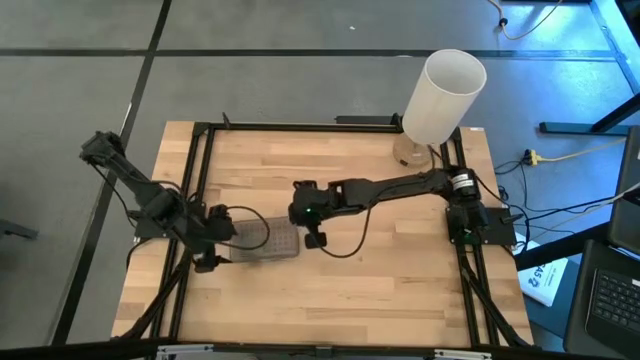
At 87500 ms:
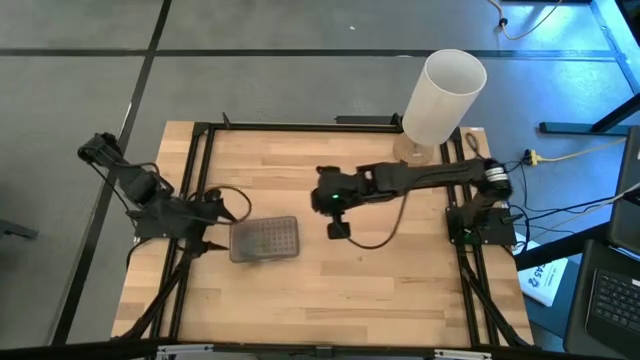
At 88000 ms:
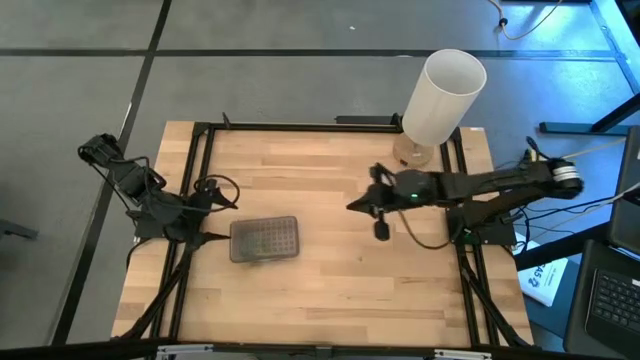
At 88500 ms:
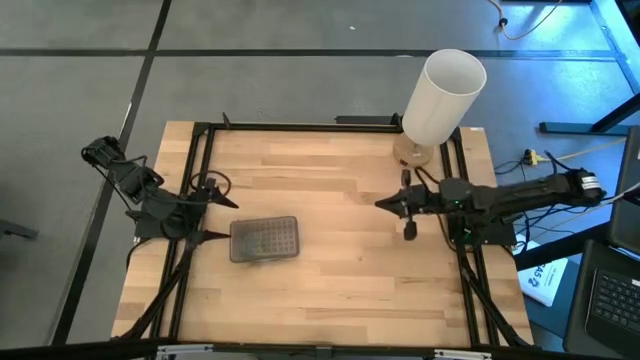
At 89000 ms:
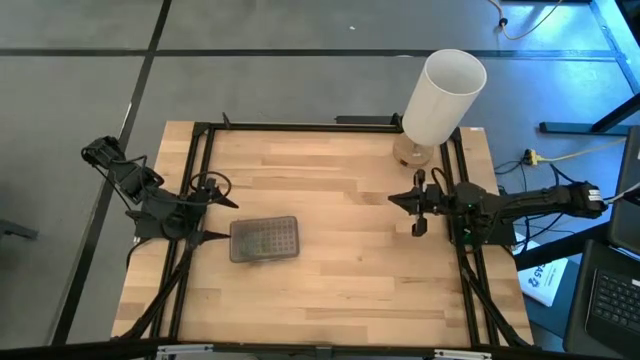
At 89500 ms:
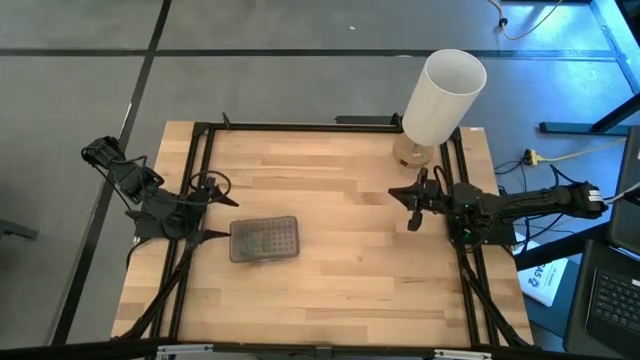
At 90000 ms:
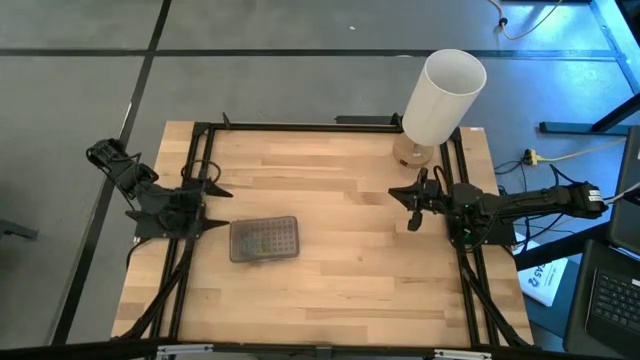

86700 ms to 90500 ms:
Task: Pack school essentials
Return to Home Position

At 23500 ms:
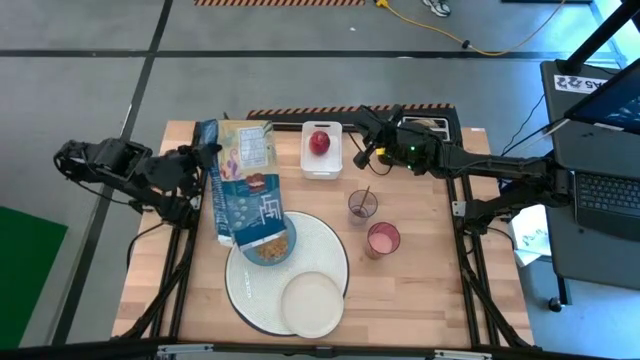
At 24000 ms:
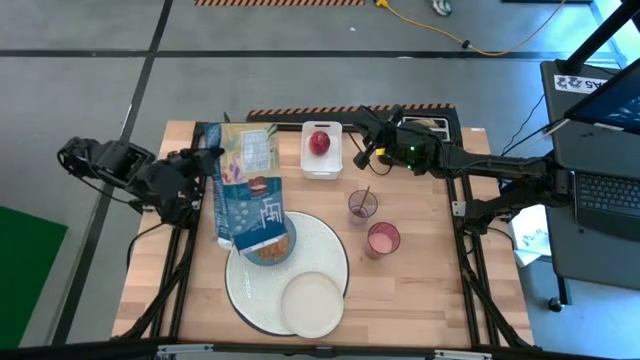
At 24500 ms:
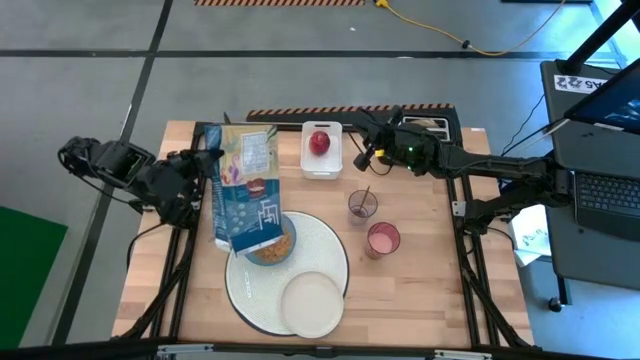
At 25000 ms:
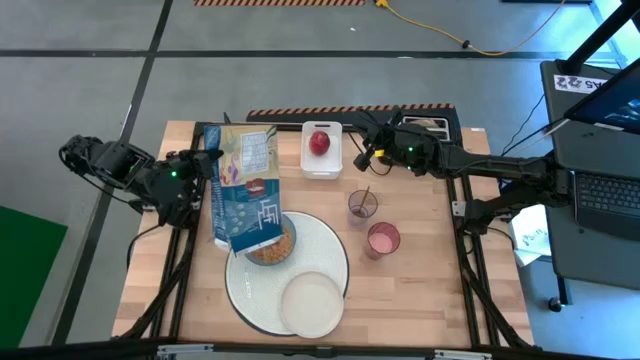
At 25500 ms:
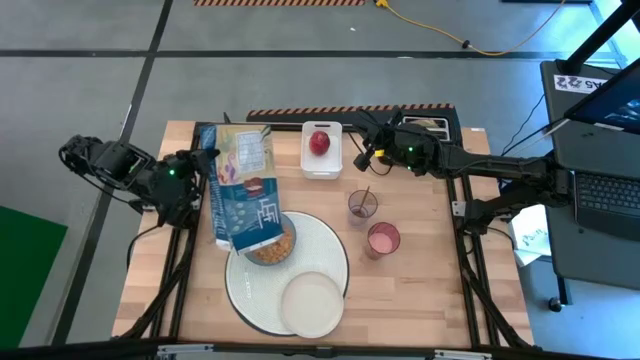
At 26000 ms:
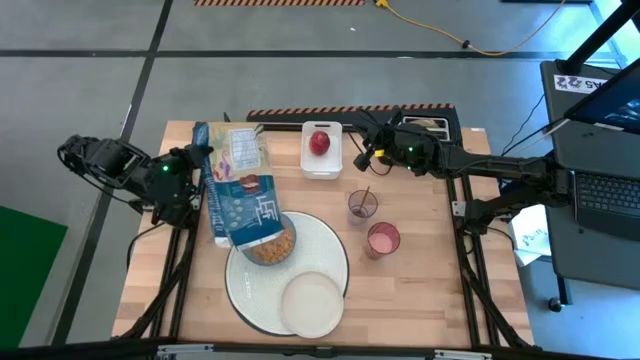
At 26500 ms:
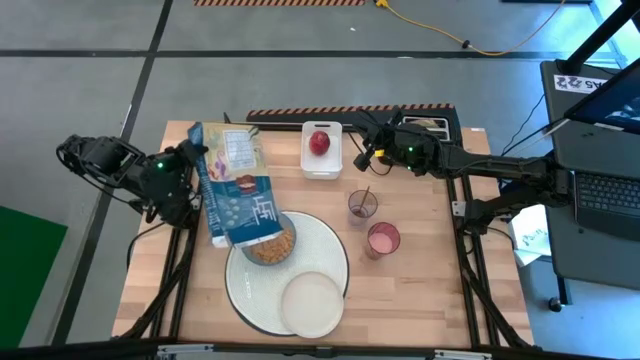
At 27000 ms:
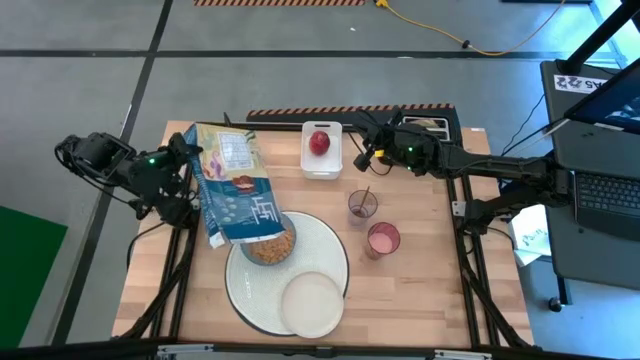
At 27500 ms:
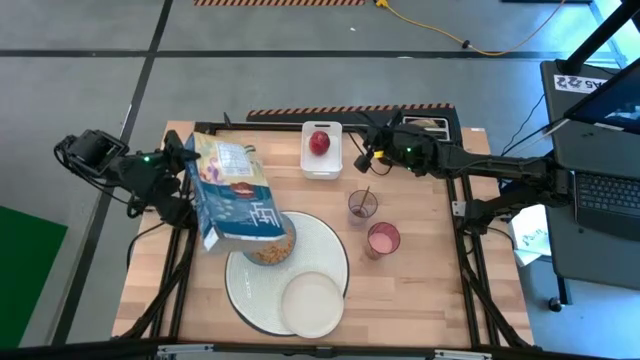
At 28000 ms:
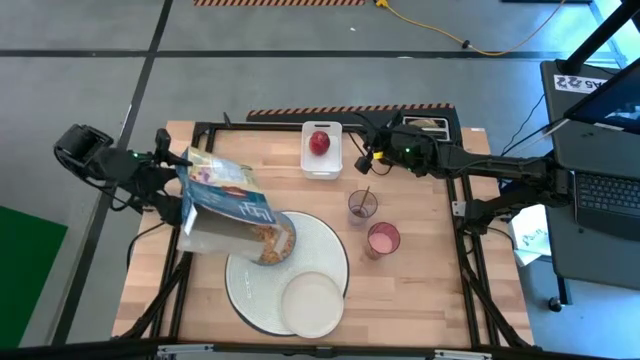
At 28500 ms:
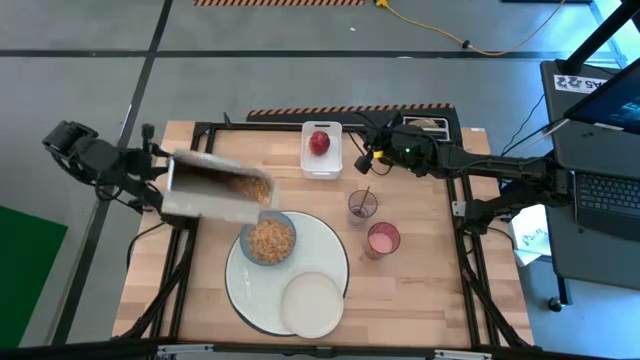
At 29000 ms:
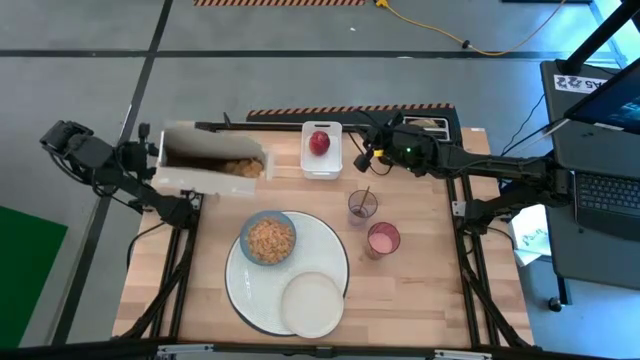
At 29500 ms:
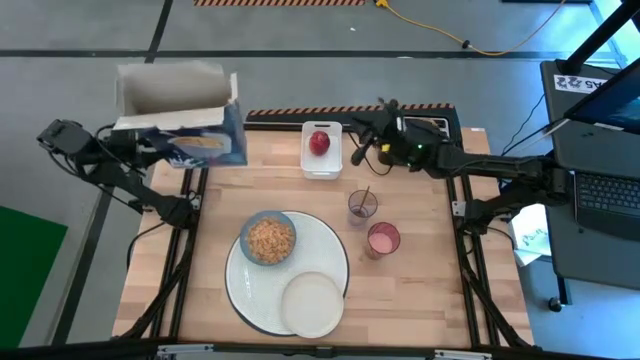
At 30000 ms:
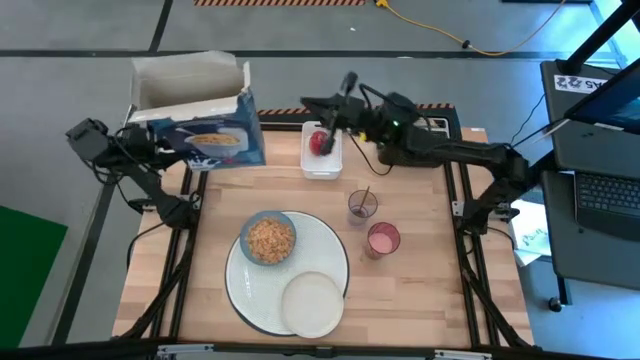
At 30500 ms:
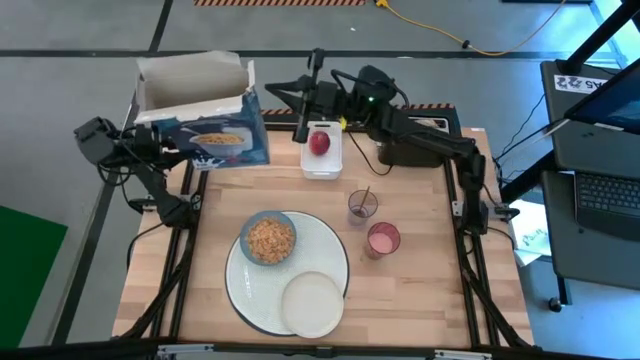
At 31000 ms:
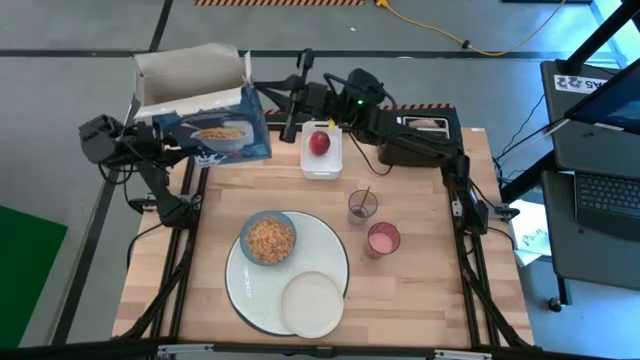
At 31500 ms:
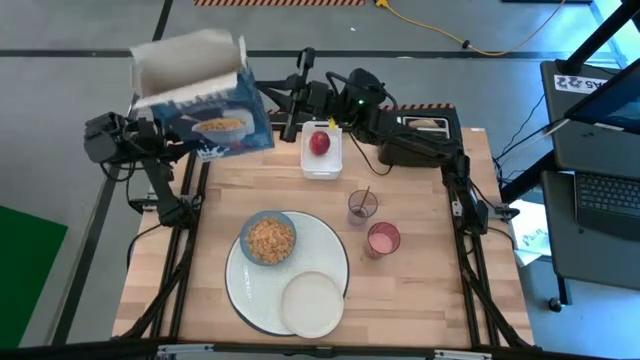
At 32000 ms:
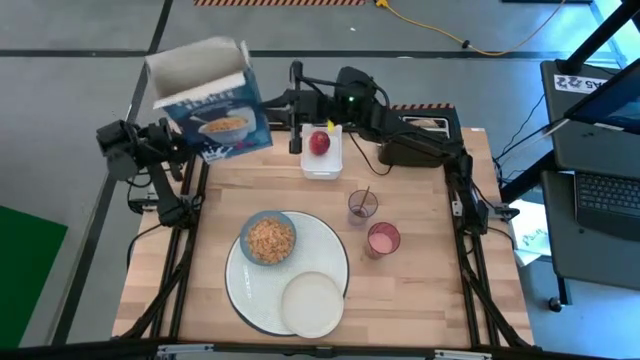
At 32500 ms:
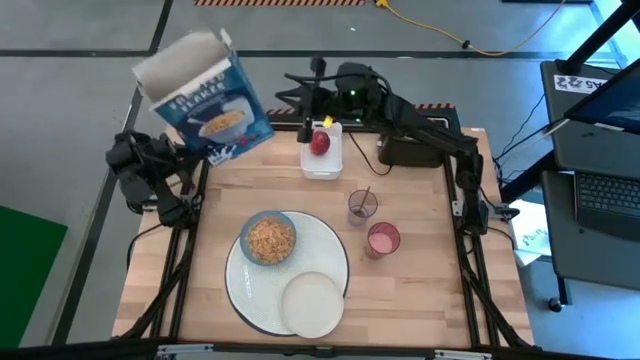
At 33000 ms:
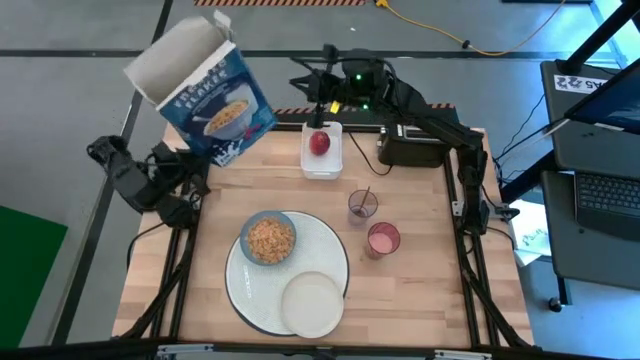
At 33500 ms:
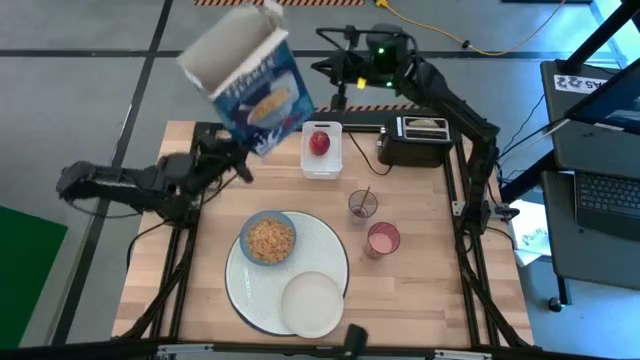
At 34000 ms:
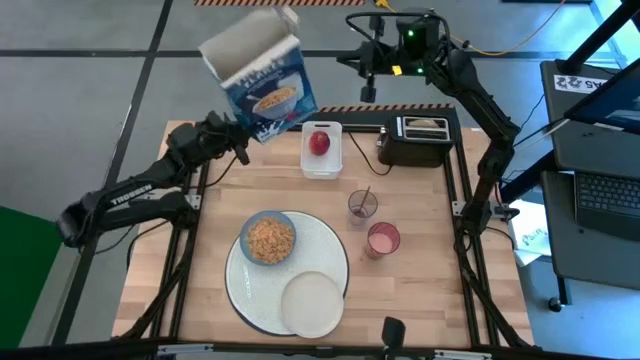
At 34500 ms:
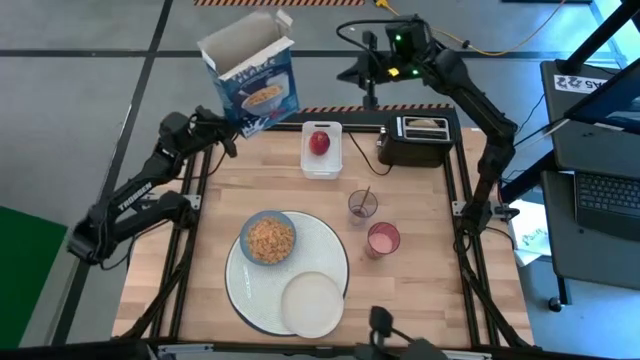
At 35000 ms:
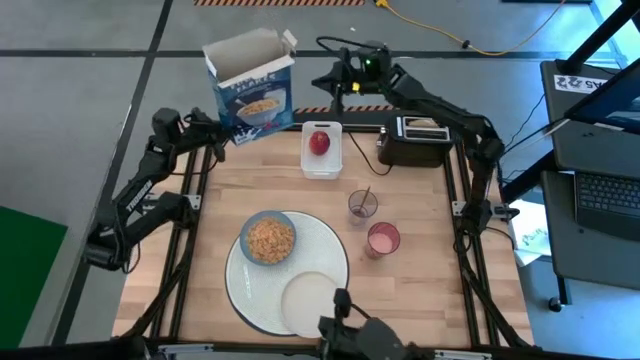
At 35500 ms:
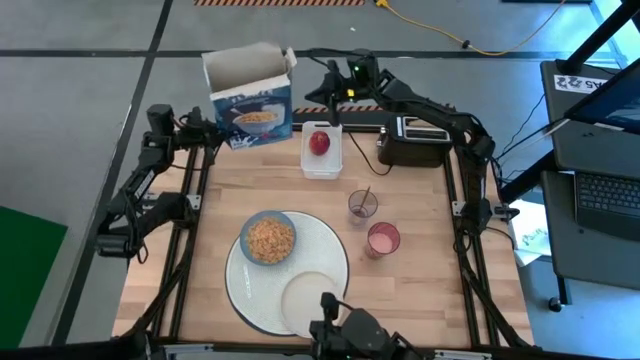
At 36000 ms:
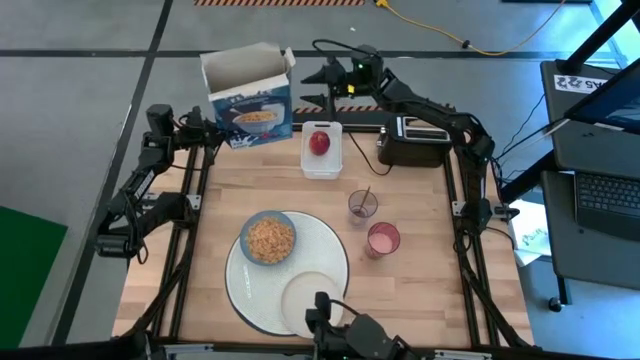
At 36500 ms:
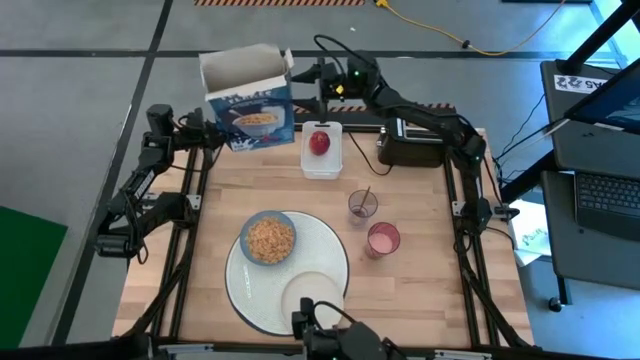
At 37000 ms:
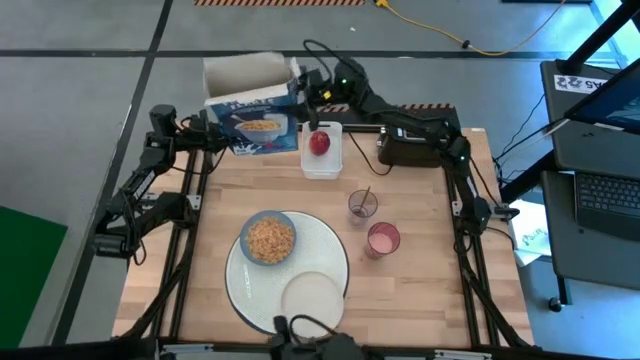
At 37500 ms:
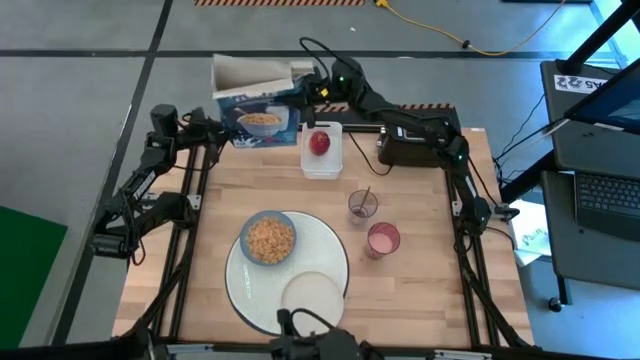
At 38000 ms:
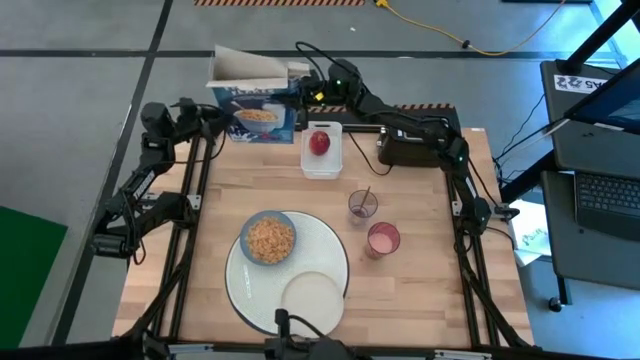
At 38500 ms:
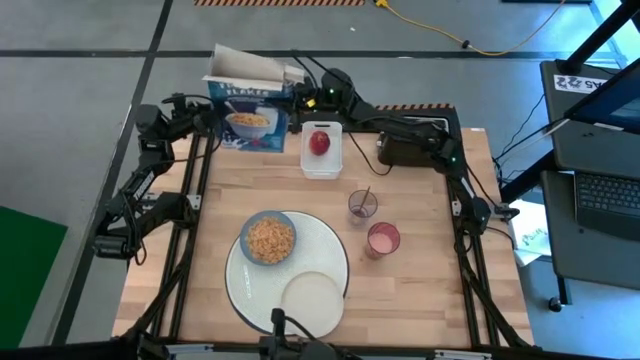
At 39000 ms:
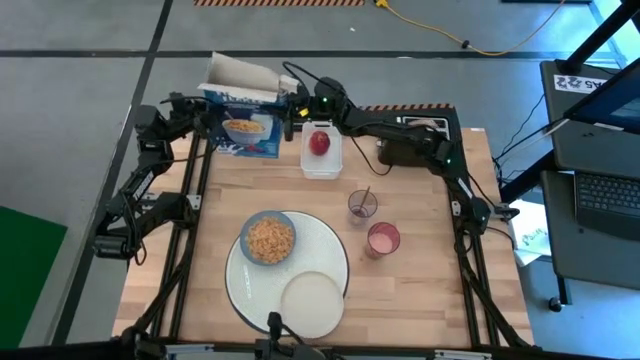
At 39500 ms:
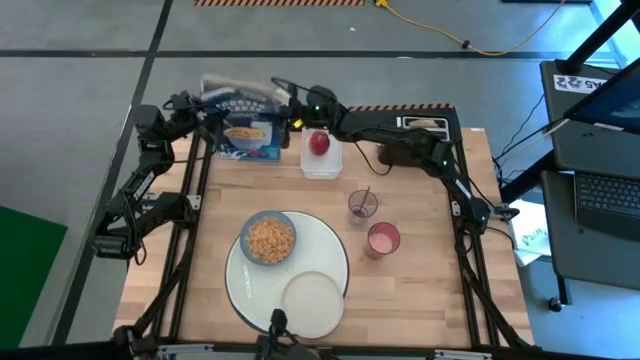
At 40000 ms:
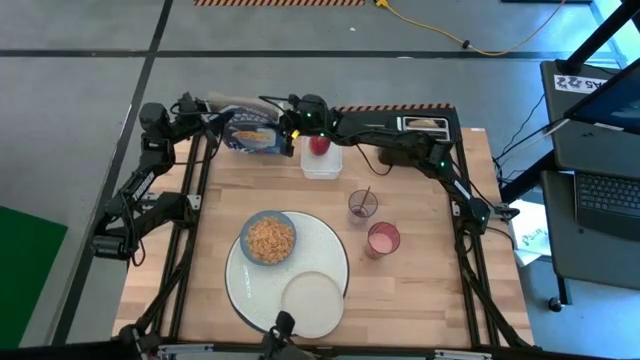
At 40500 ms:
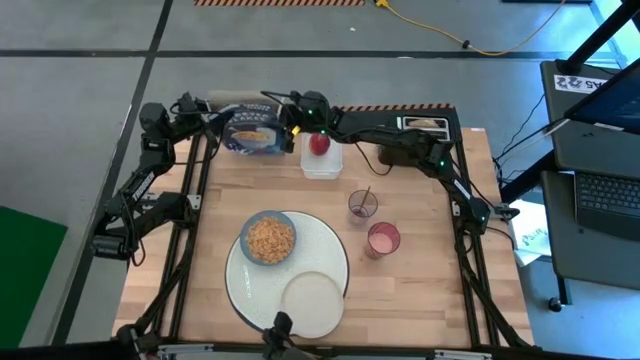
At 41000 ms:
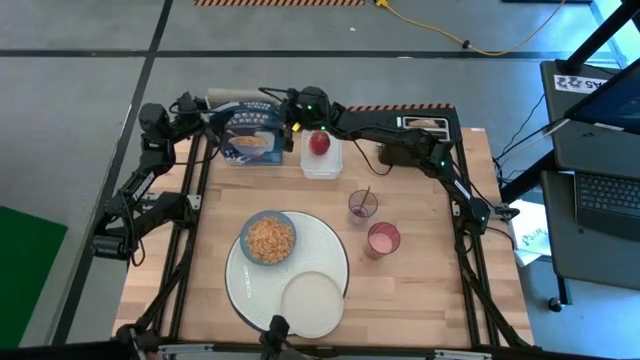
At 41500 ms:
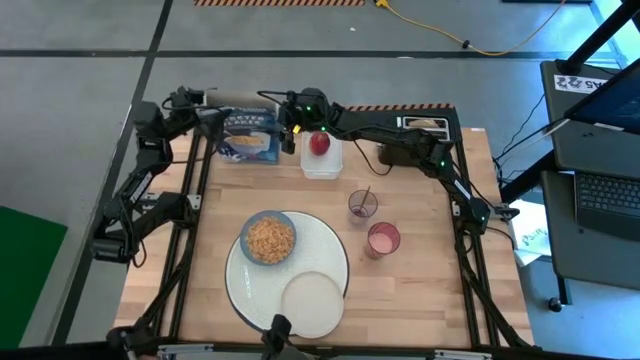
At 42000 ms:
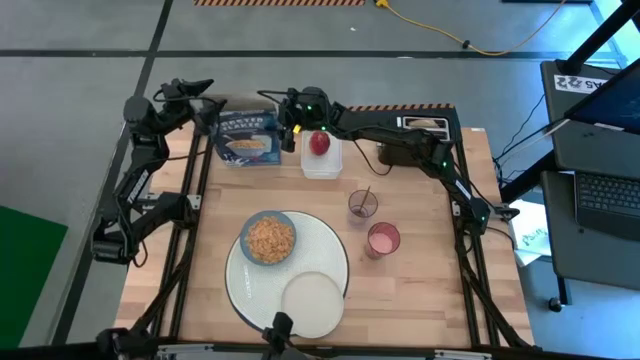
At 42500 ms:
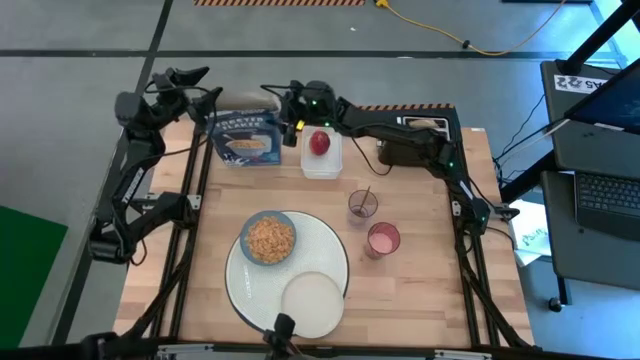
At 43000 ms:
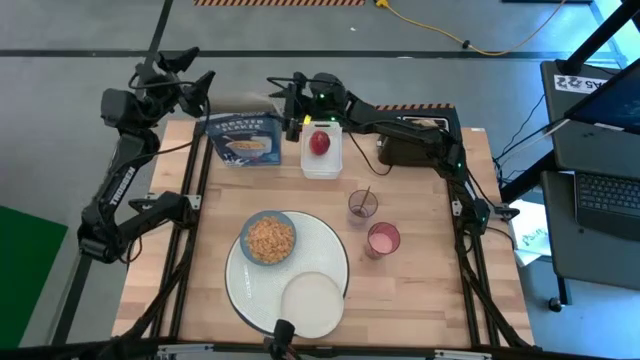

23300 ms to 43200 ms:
Task: Arrange a breakfast setting
Pour the cereal into the blue bowl
